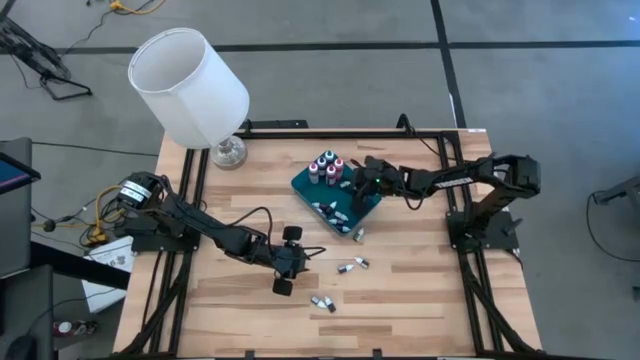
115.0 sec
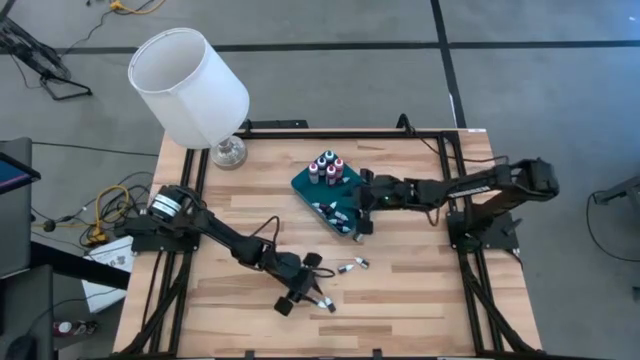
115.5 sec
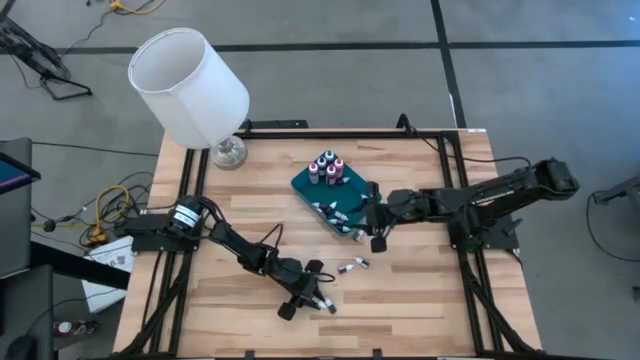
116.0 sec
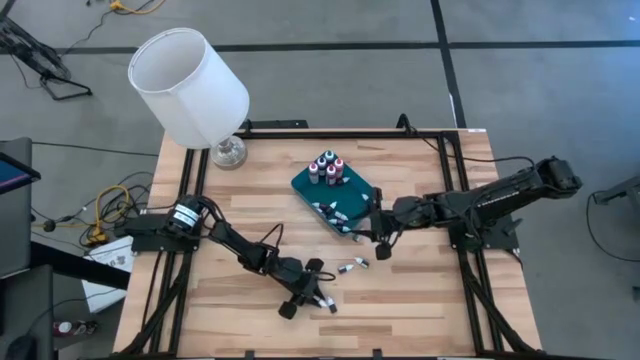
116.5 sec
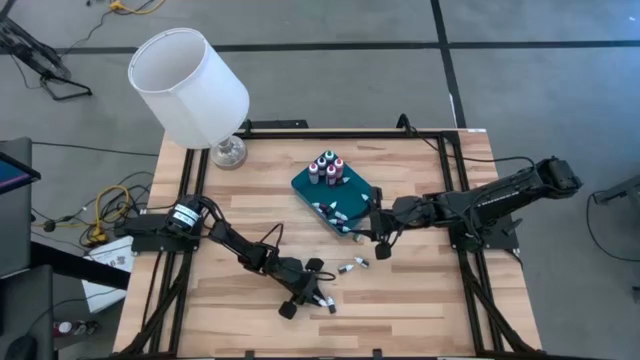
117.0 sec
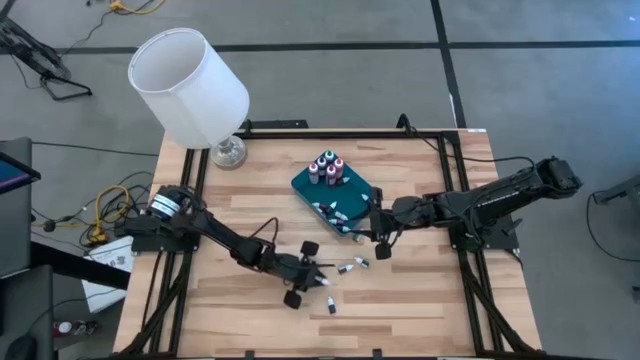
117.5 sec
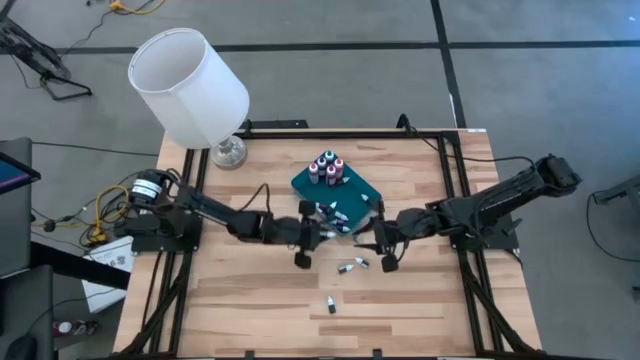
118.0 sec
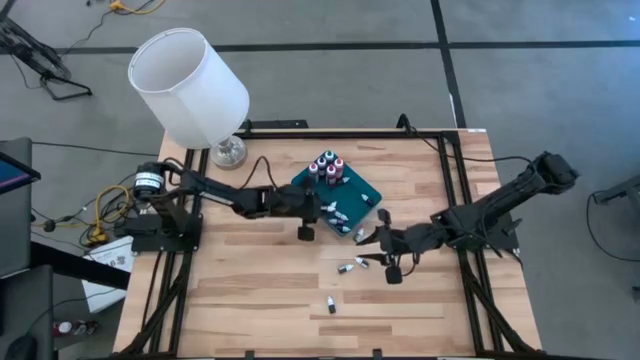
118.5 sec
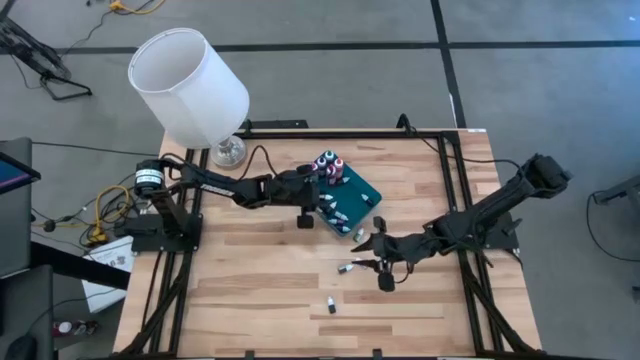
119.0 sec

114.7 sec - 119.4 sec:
Task: Pick & Place food coloring
Put the small red food coloring bottle into the blue bin

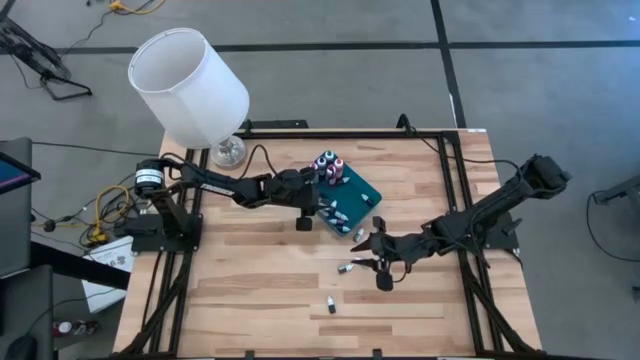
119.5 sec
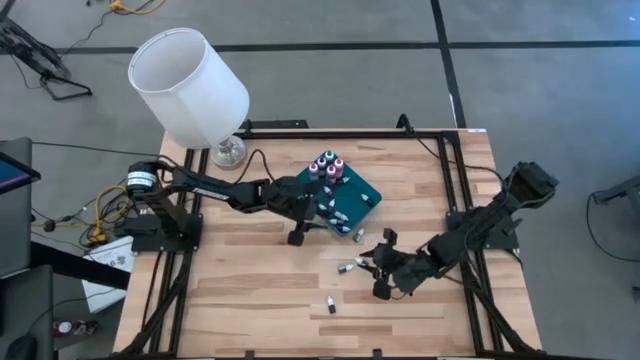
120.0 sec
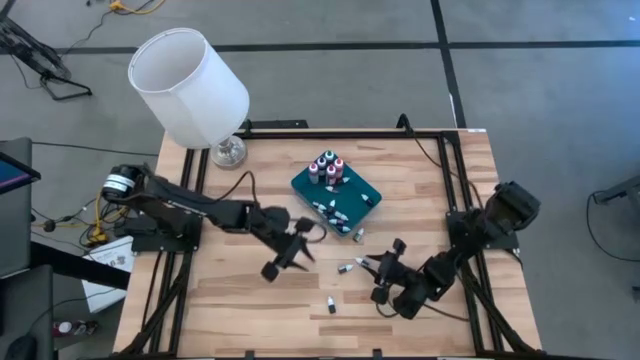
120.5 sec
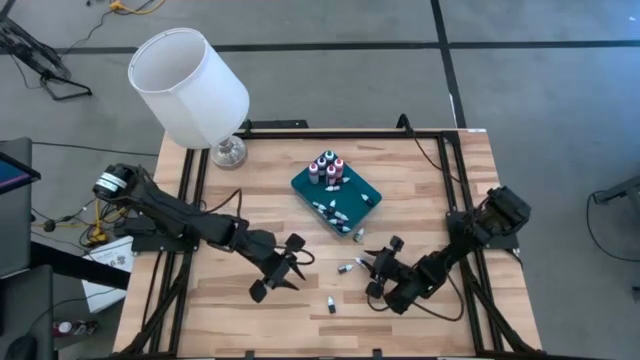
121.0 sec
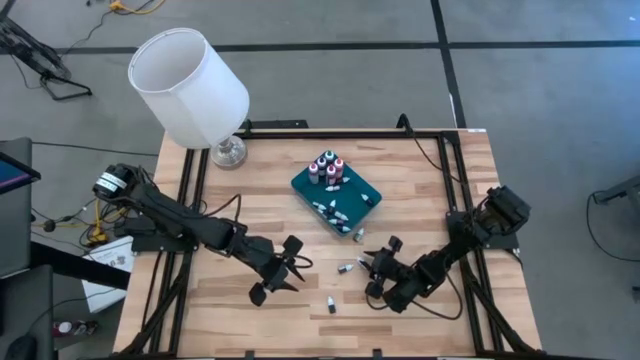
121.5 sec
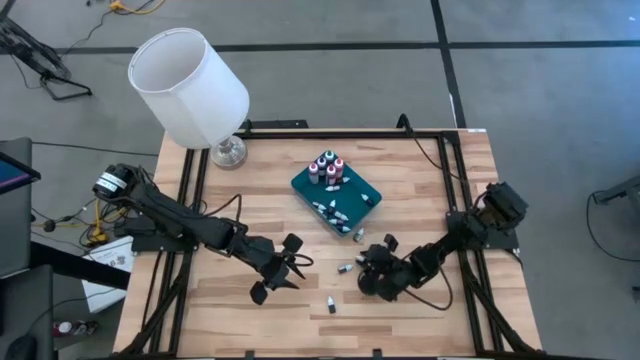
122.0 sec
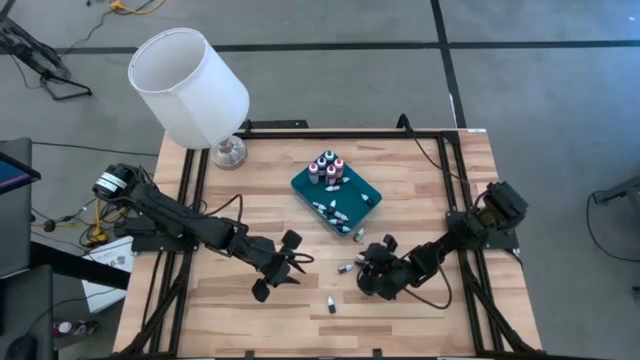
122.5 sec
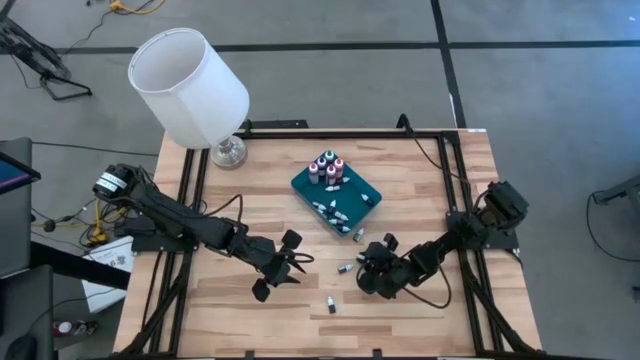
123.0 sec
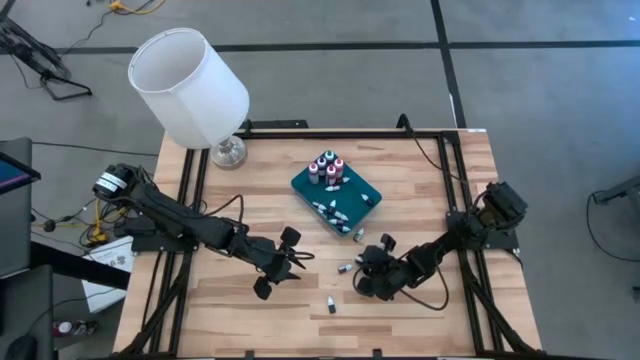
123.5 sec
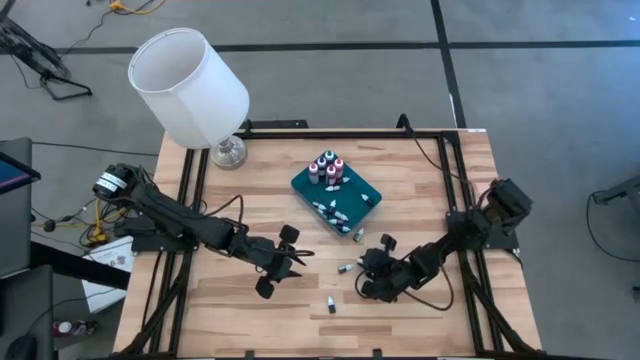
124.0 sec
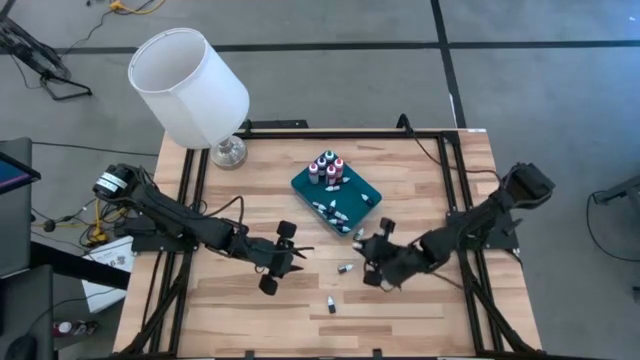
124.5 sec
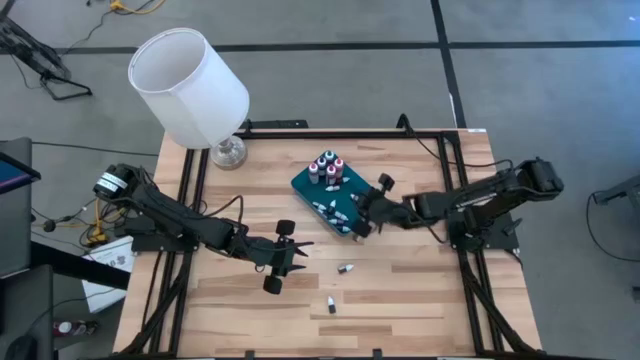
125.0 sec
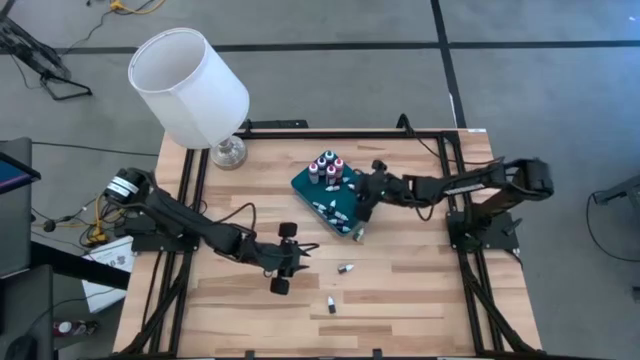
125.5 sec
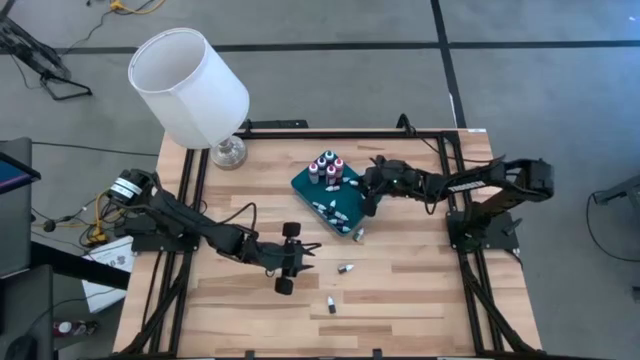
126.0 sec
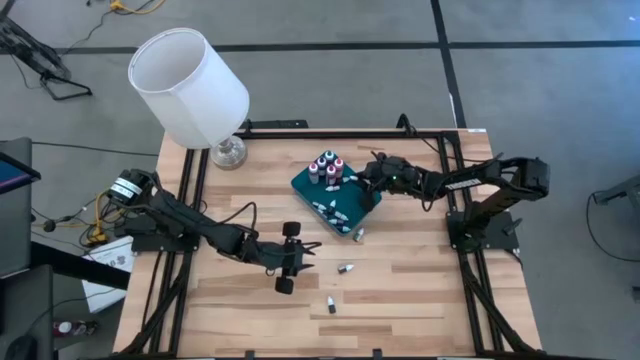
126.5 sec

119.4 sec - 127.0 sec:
Put the small white food coloring bottle into the blue bin

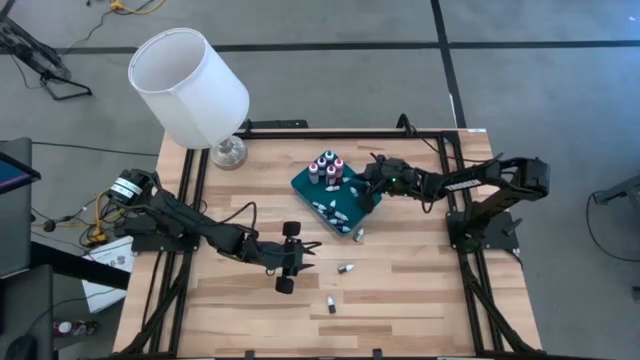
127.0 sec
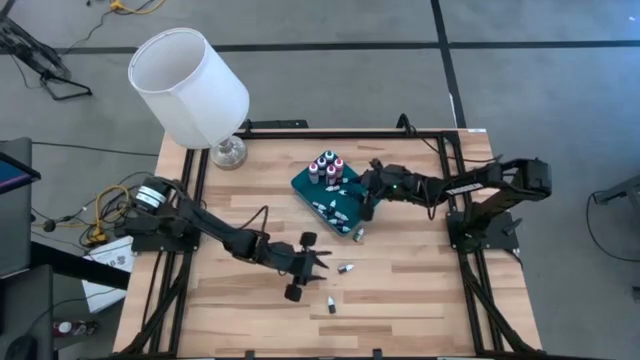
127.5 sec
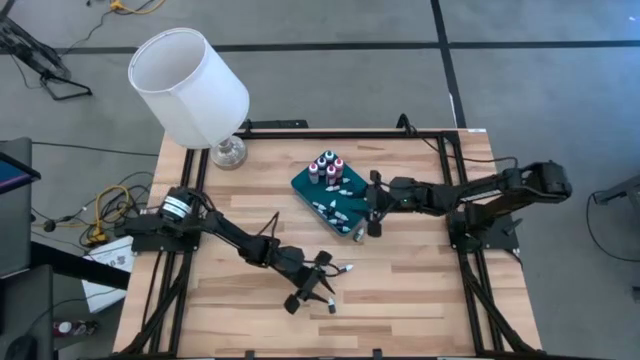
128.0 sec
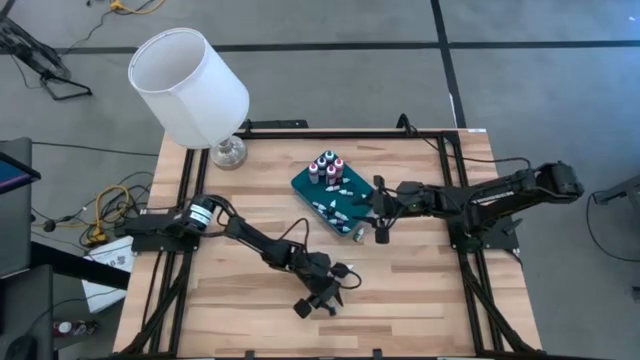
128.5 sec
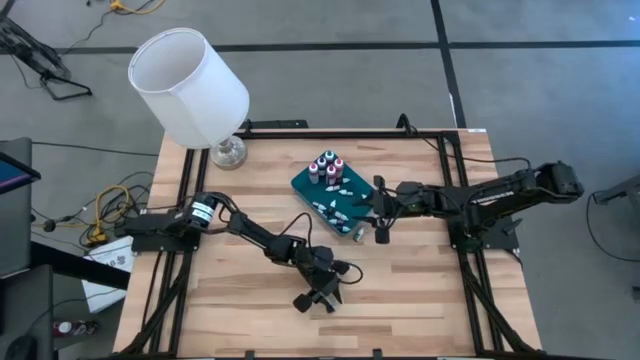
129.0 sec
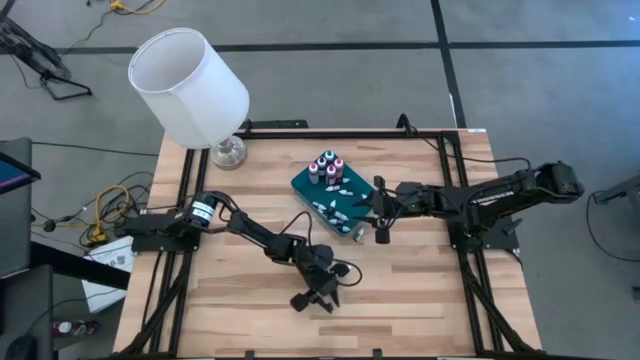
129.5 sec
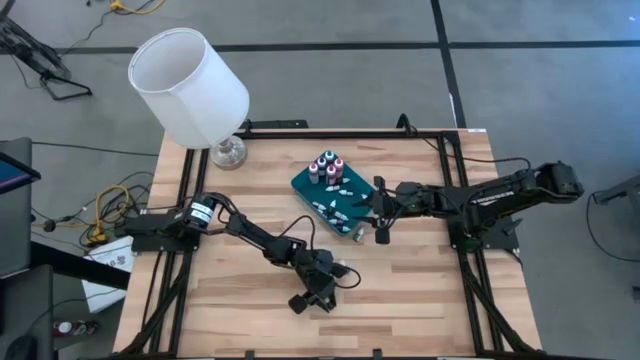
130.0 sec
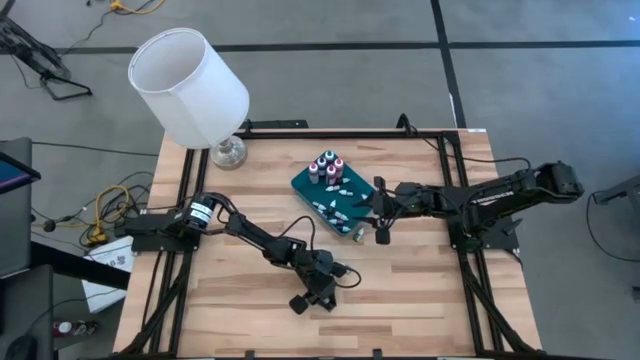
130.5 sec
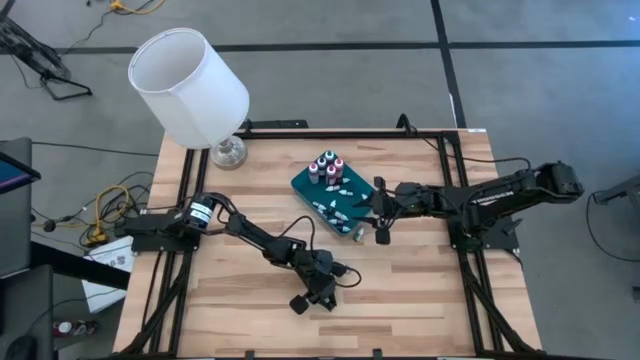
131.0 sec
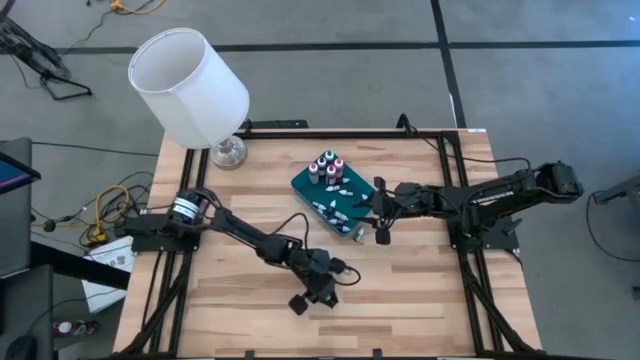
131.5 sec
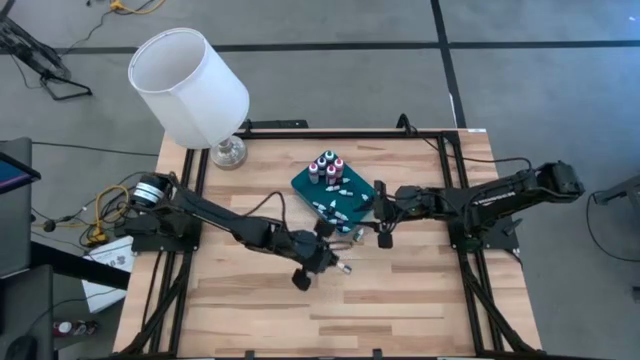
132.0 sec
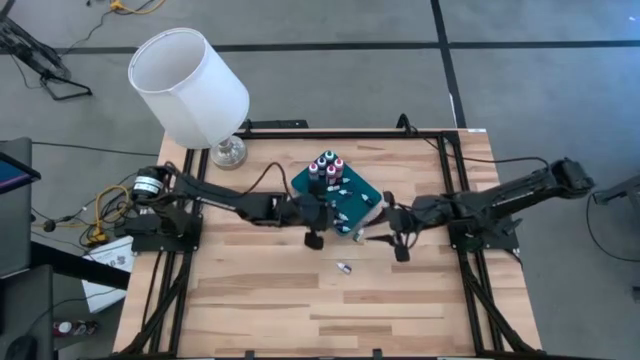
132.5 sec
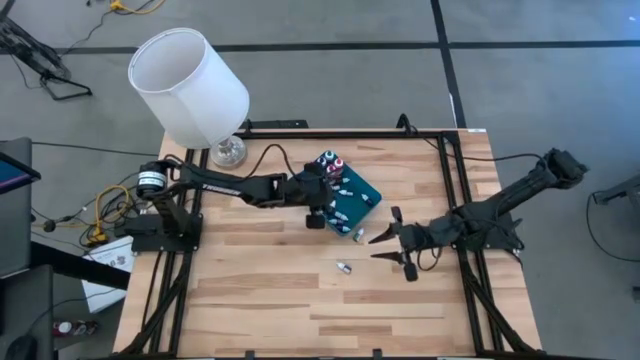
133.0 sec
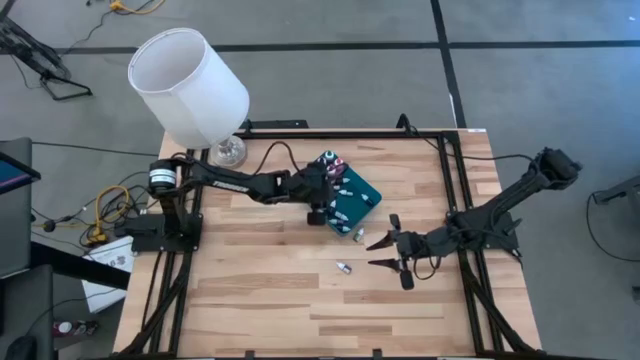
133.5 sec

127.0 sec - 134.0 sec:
Put the small brown food coloring bottle into the blue bin

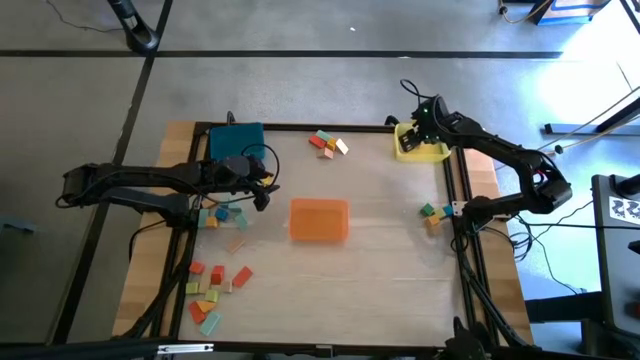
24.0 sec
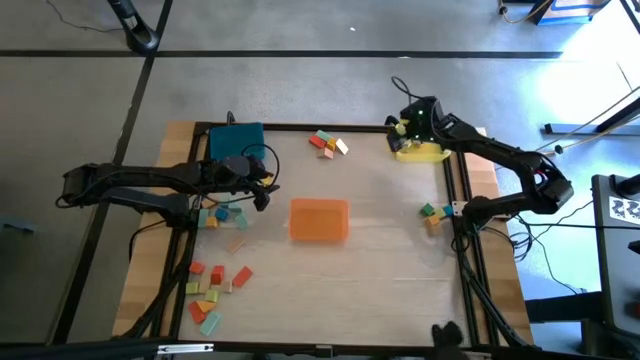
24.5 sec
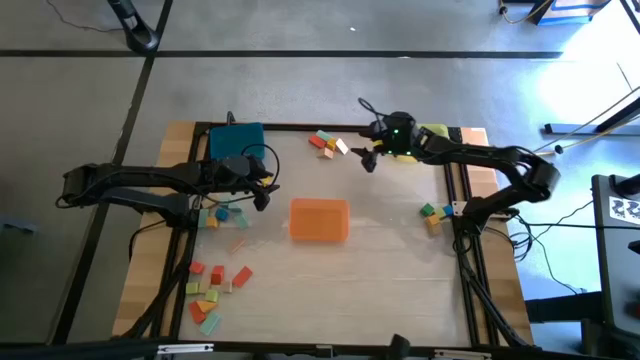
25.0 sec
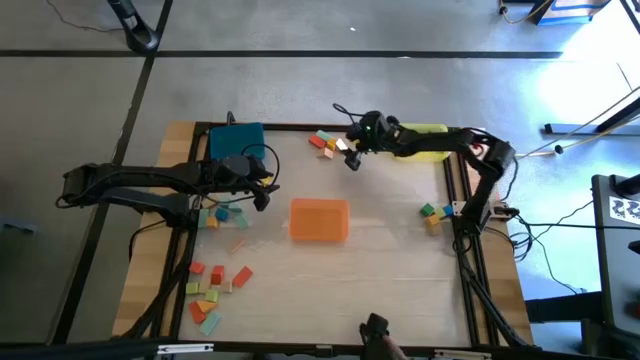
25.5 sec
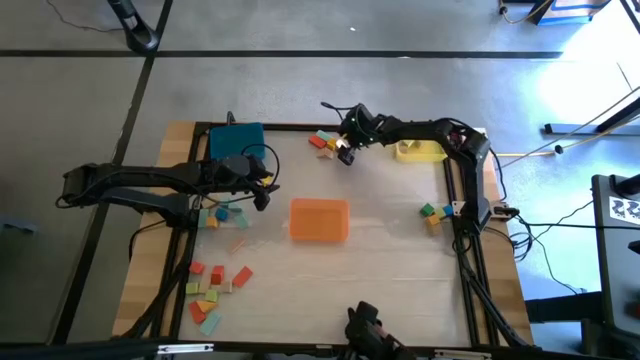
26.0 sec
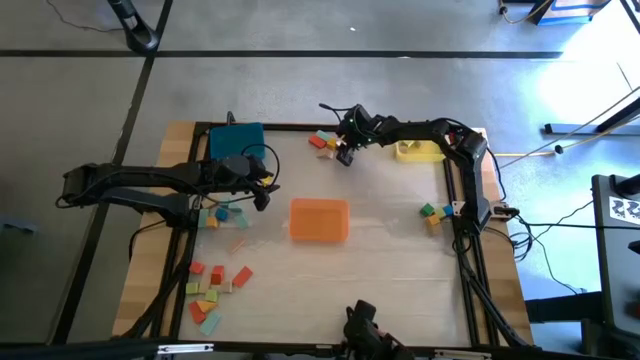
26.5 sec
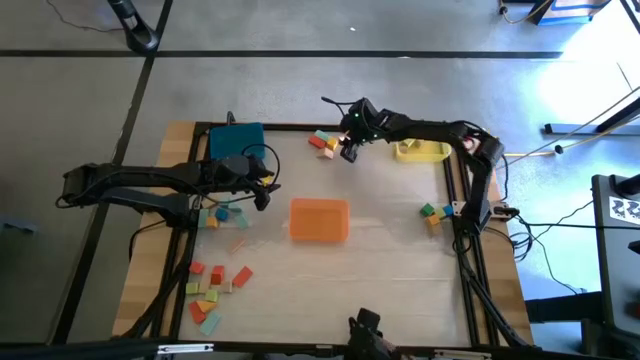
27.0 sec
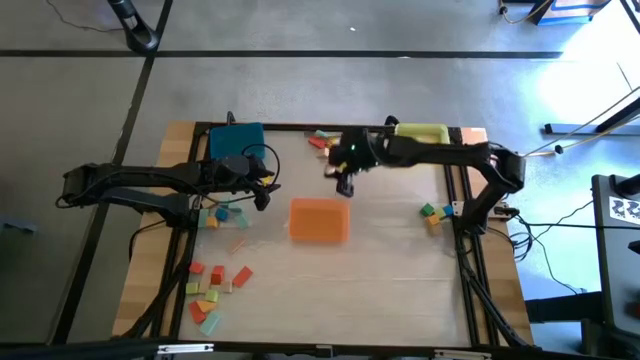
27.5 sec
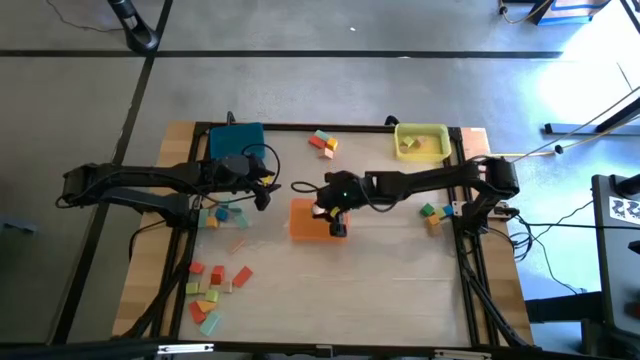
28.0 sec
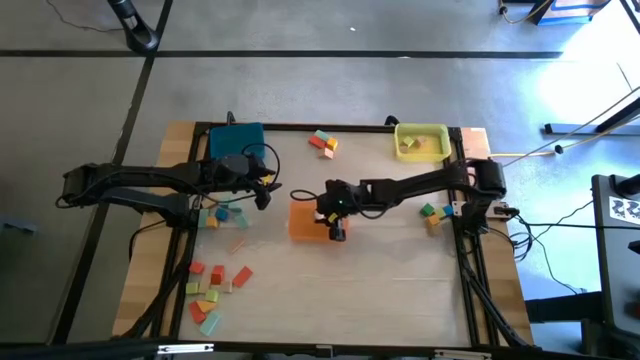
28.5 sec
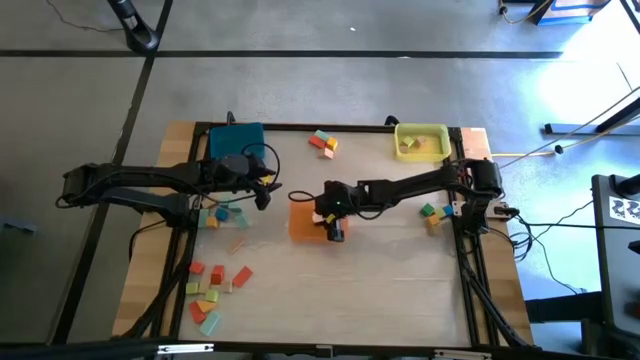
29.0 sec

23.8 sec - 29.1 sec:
Task: Sort blocks by size
Put the brown triangular block into the orange bin
